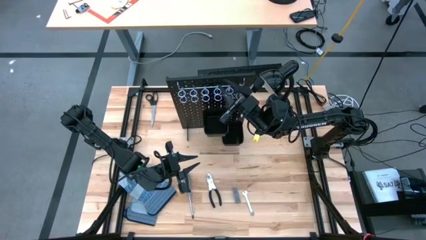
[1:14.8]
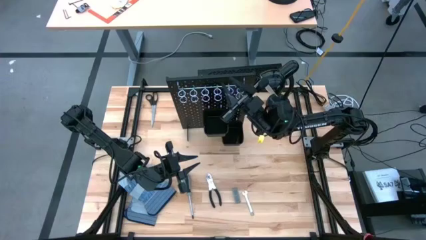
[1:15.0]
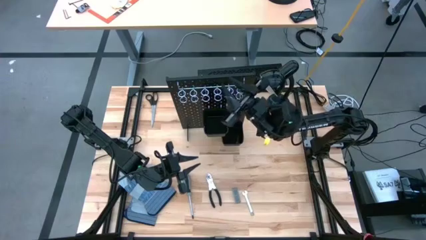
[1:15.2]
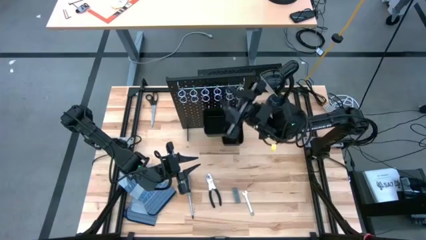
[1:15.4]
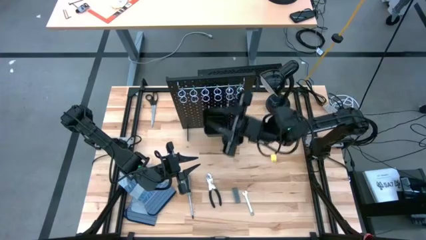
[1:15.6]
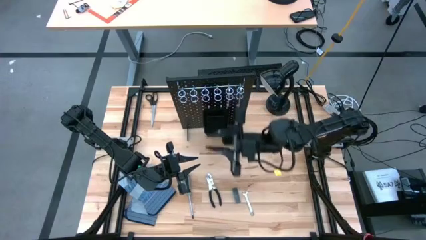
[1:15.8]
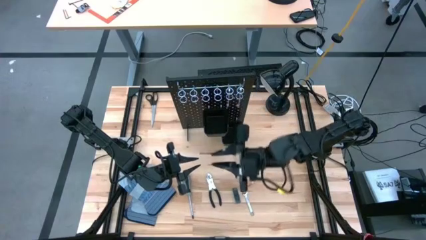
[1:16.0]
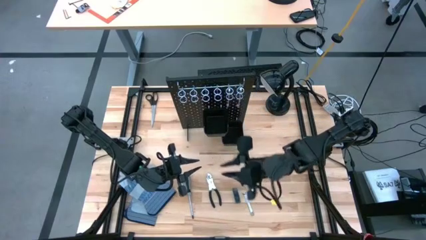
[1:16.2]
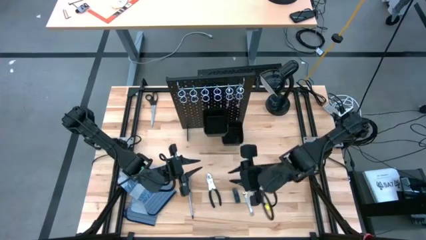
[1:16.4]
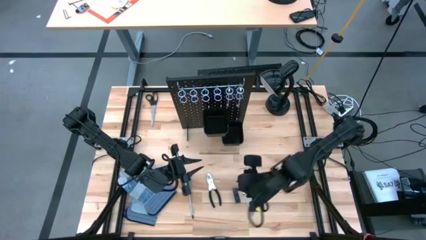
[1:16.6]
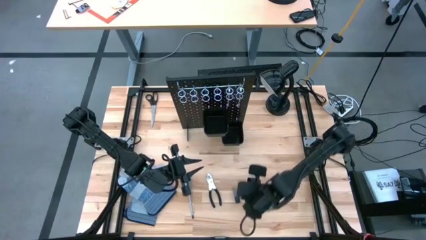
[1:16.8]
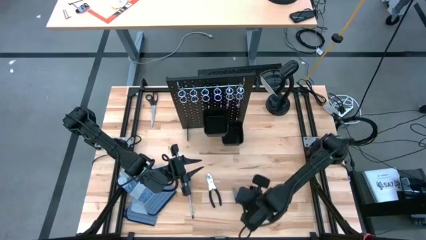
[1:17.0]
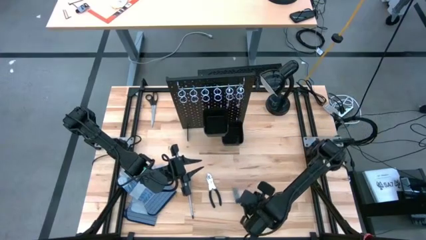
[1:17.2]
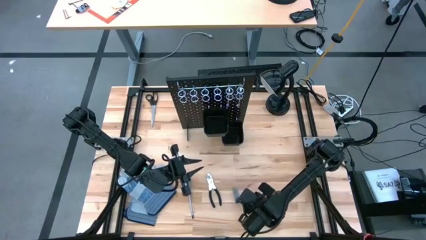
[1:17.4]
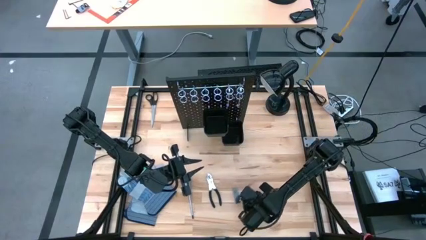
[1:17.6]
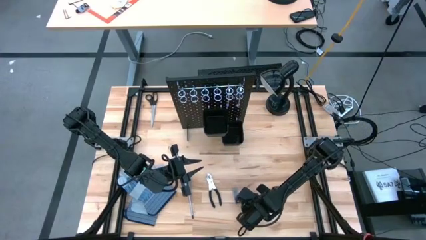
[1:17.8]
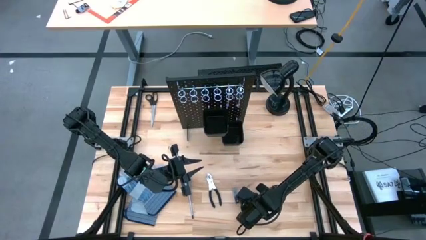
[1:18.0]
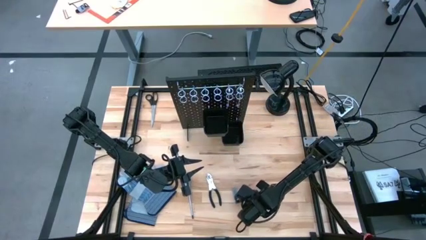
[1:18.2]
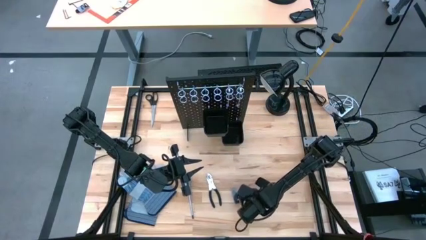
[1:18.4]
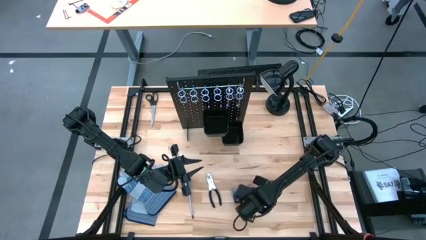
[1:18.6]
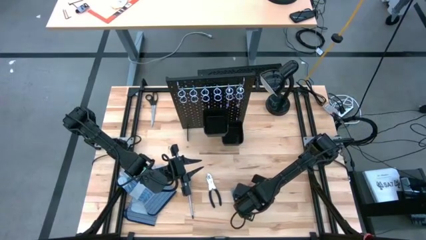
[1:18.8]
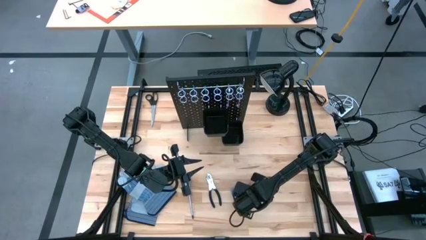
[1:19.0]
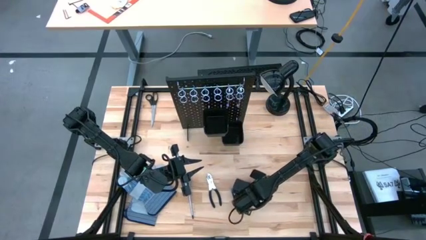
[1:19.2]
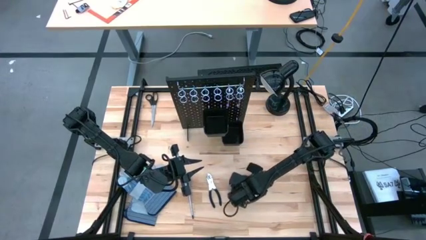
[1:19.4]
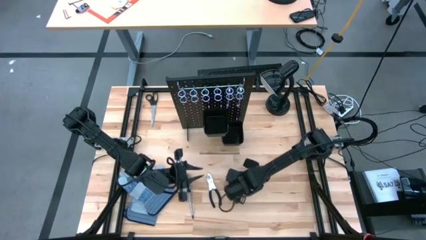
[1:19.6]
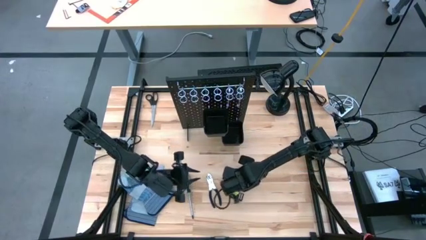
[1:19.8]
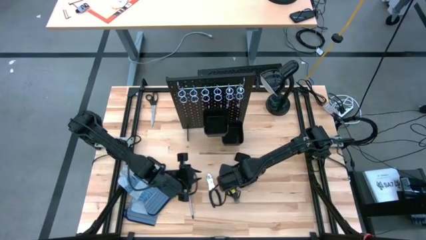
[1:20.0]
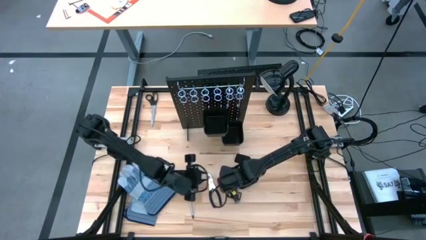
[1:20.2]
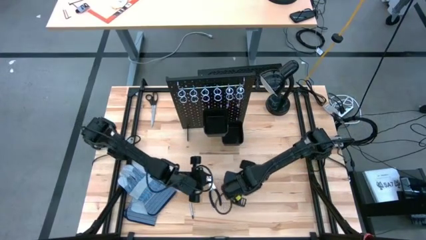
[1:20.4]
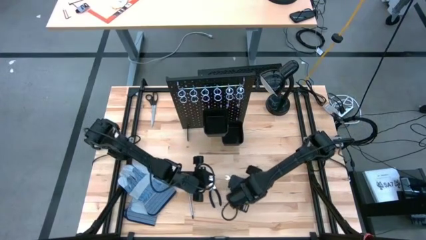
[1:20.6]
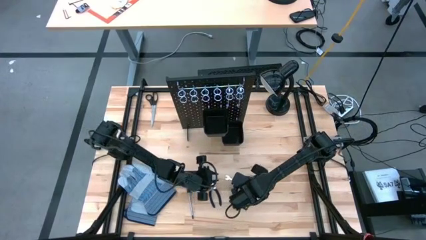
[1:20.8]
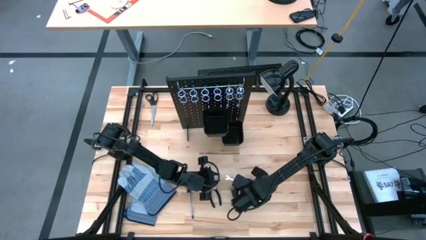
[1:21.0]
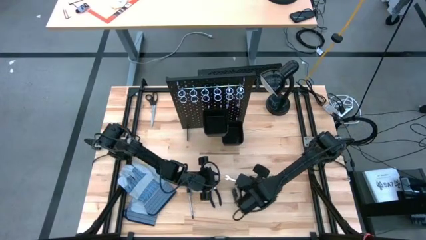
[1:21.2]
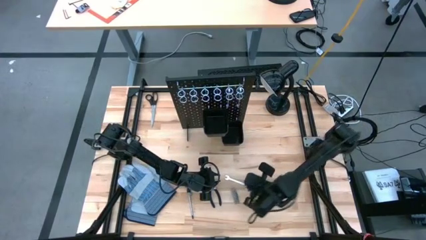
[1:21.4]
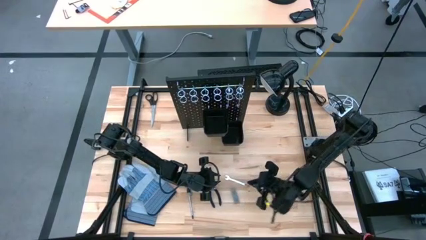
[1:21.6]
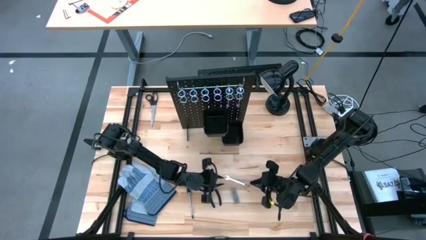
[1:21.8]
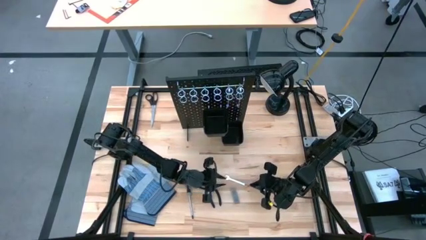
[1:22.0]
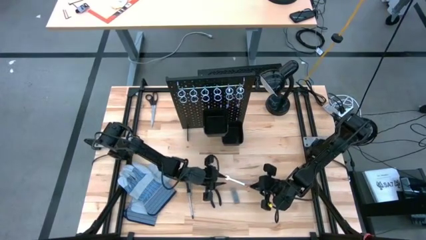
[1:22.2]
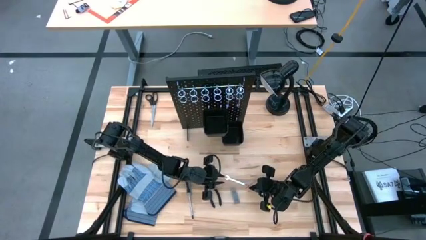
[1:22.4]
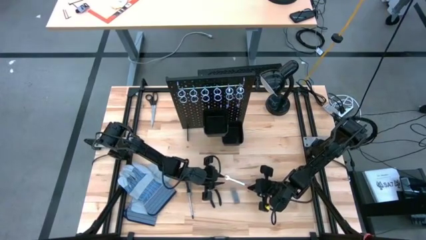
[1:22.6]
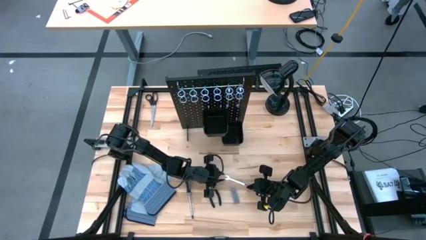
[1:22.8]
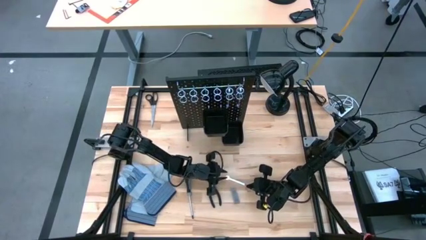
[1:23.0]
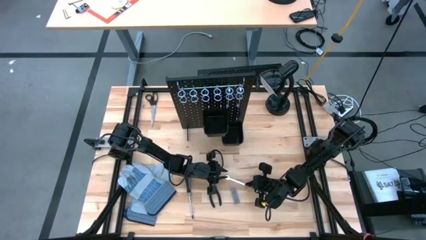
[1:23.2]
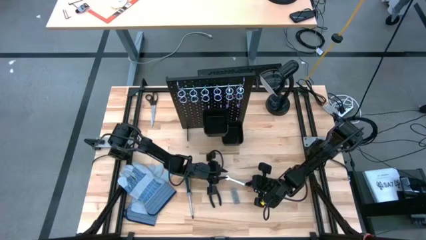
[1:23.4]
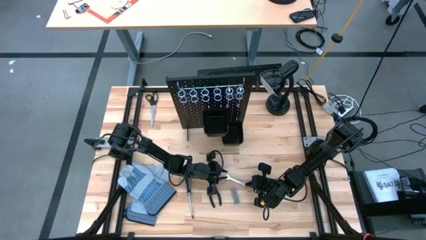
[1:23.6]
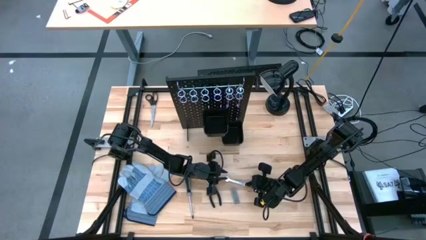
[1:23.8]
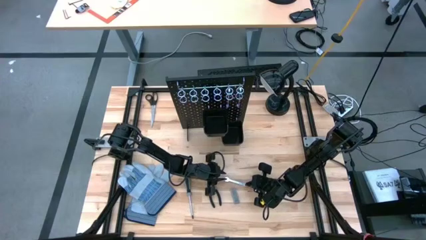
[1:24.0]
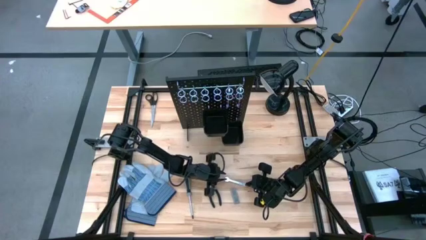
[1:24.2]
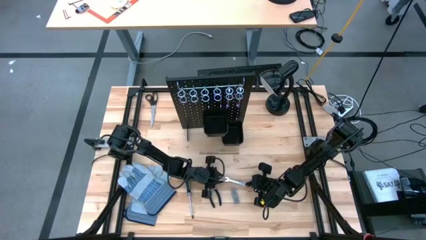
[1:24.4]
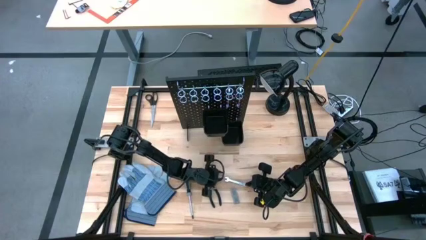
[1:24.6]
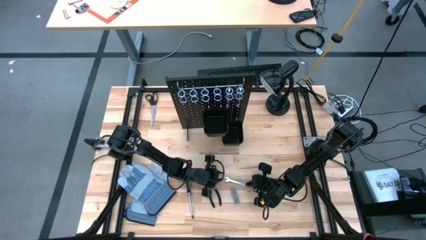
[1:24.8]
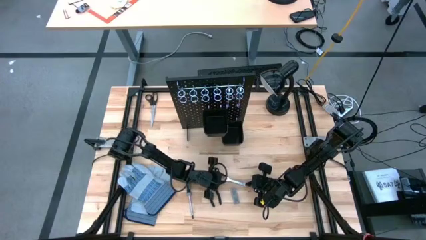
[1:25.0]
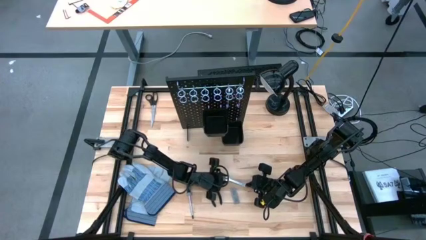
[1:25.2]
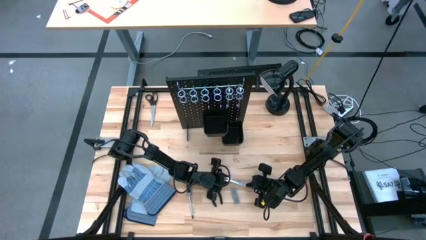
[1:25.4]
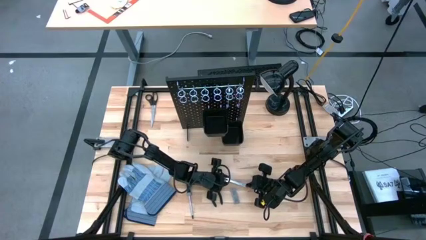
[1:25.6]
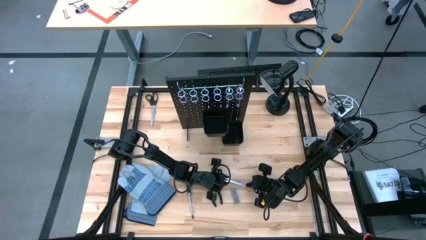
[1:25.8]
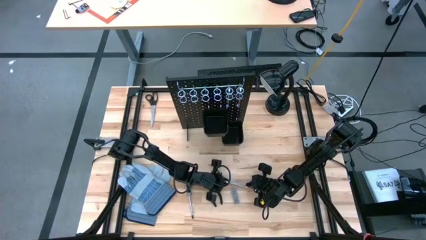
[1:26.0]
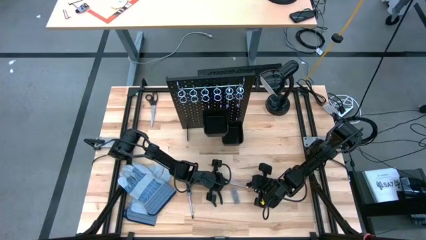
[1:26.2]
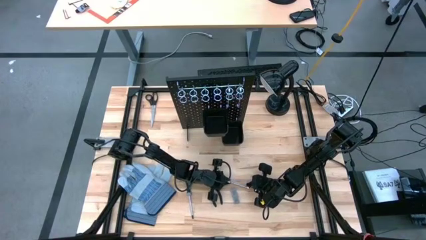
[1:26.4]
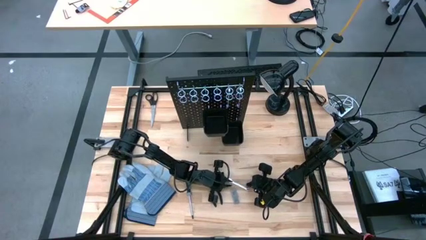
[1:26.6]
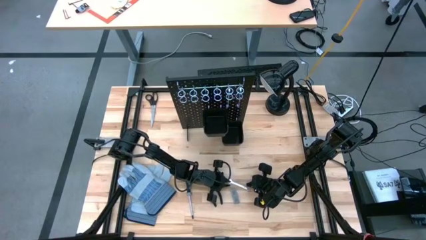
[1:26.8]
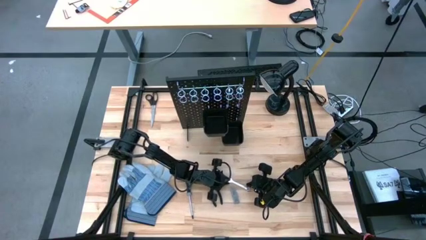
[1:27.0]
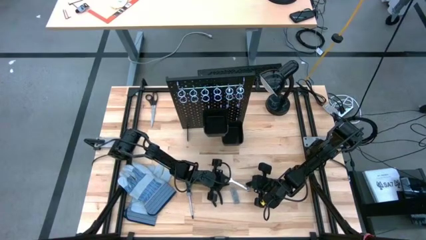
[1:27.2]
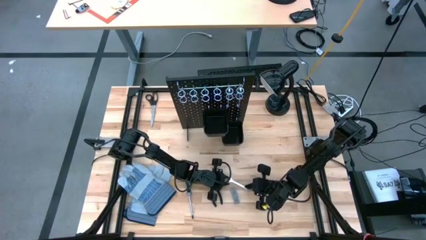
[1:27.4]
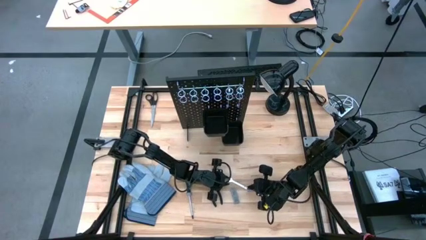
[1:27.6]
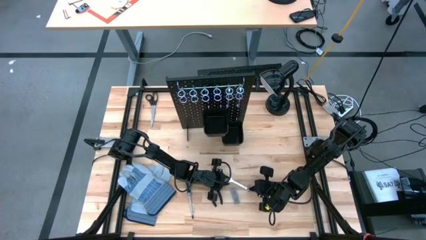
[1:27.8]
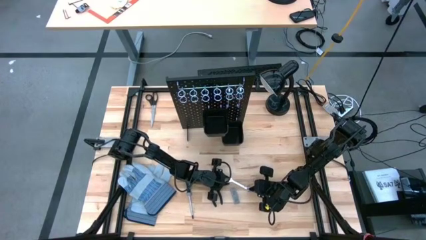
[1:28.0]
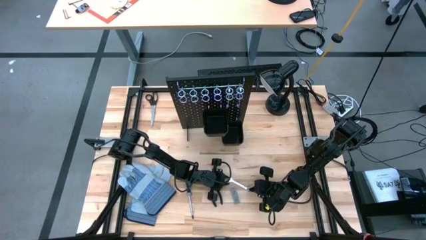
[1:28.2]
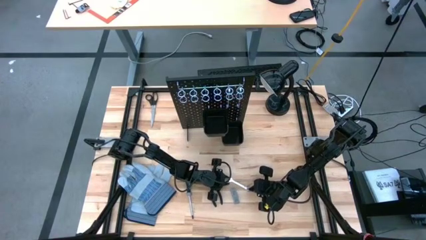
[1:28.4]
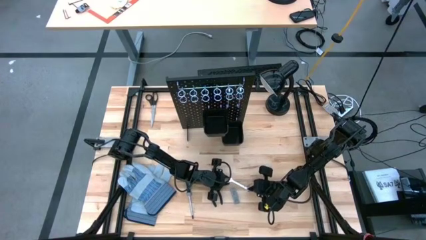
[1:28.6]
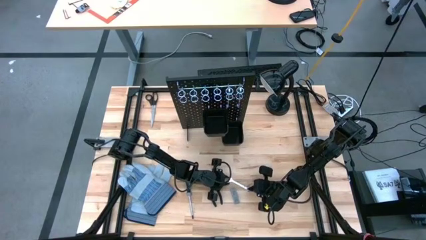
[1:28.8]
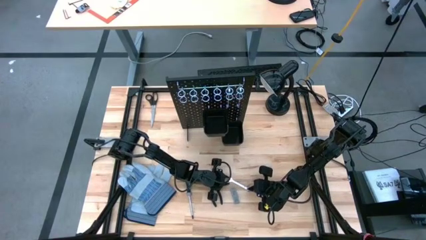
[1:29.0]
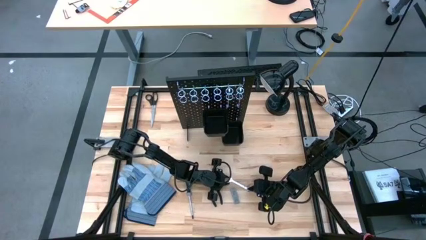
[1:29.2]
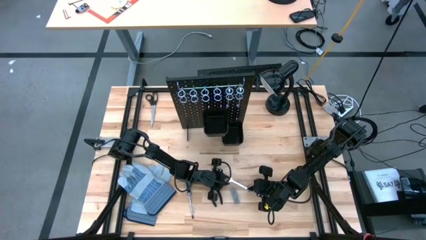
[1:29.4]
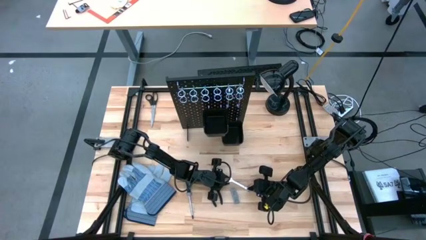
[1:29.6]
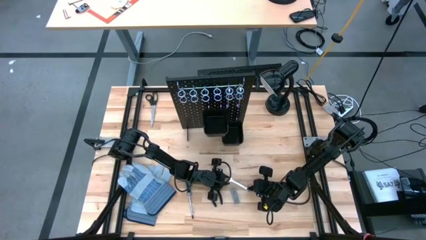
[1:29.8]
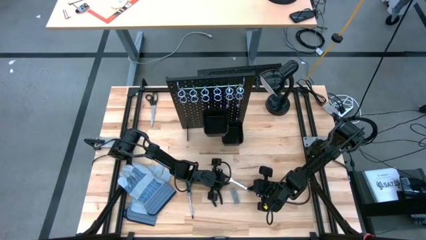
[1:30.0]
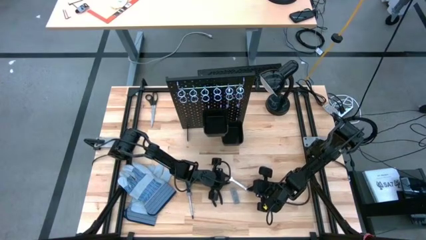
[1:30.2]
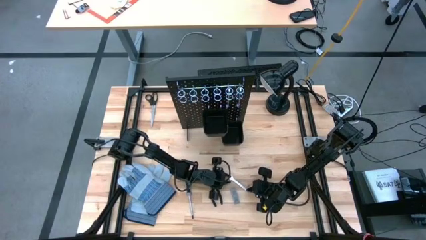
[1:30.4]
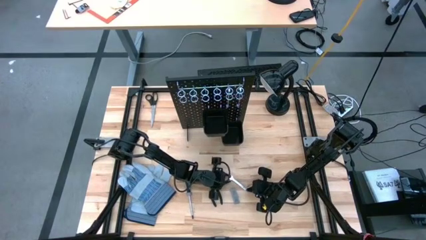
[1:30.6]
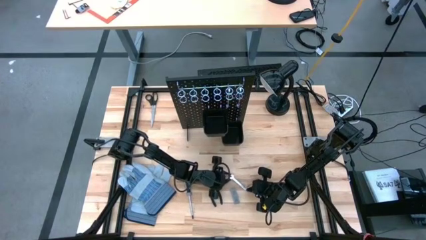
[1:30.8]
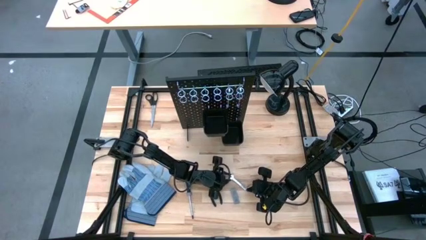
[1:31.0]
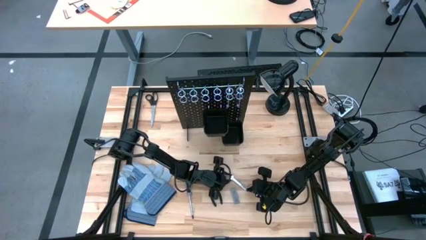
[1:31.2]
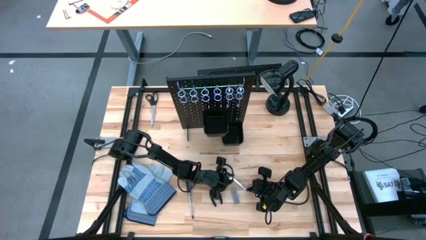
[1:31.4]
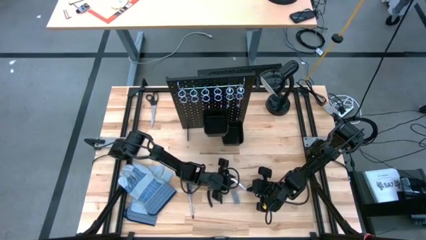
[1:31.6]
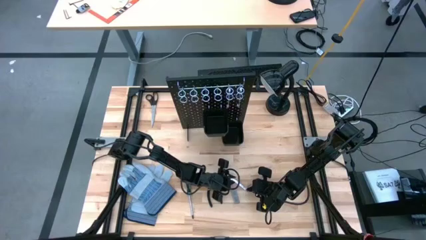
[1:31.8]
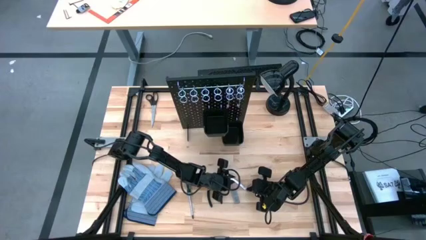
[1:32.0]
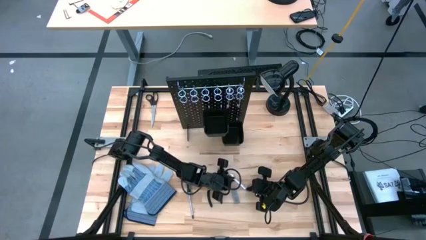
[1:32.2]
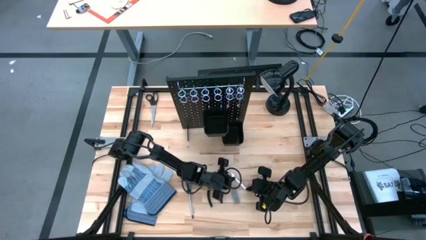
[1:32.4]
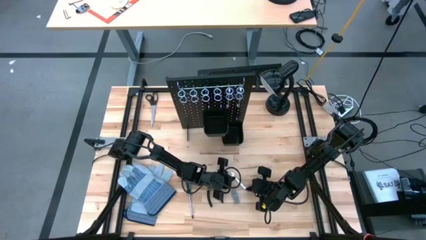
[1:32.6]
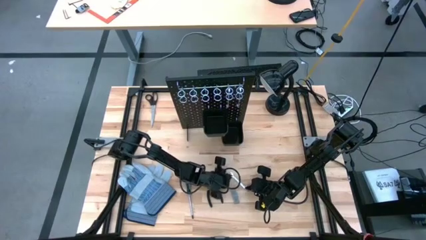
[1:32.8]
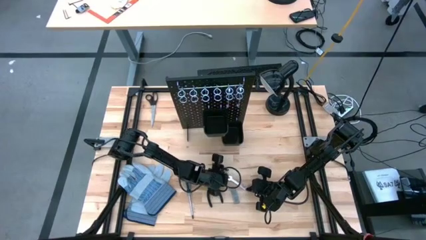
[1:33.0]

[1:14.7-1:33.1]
Task: Hang tools onto peg board
Hang the silver wrench on the black pegboard
